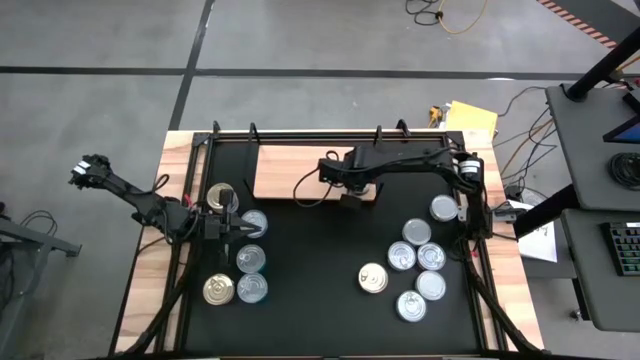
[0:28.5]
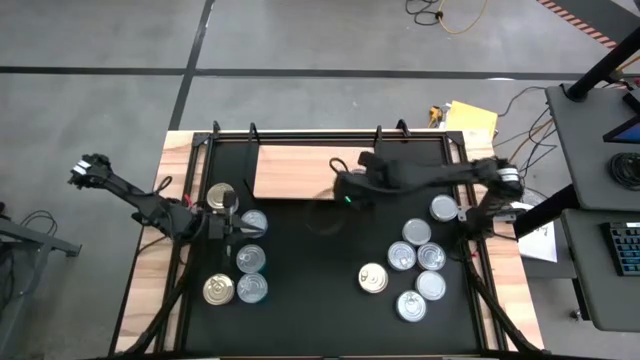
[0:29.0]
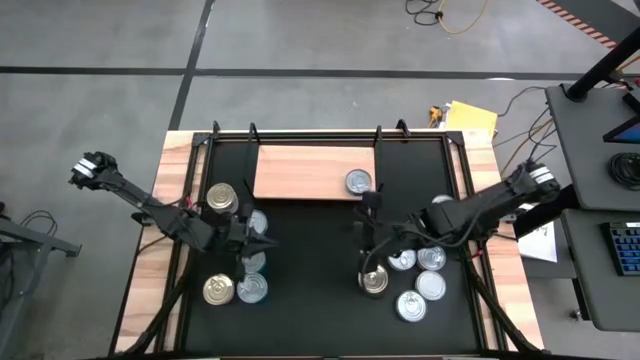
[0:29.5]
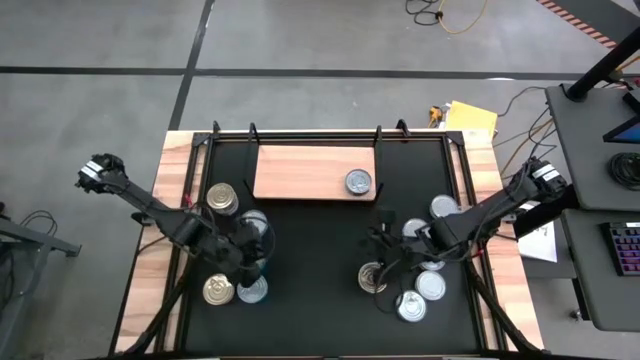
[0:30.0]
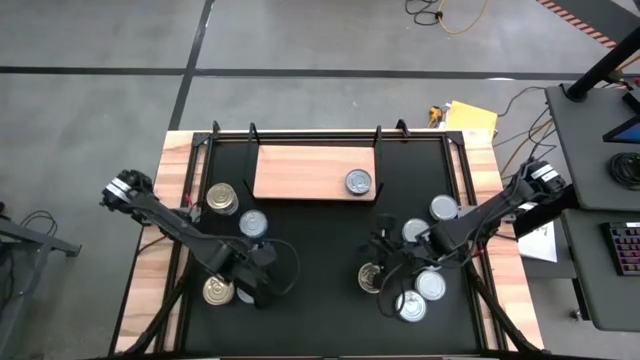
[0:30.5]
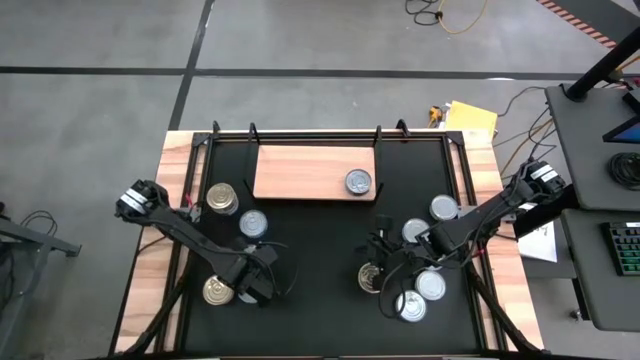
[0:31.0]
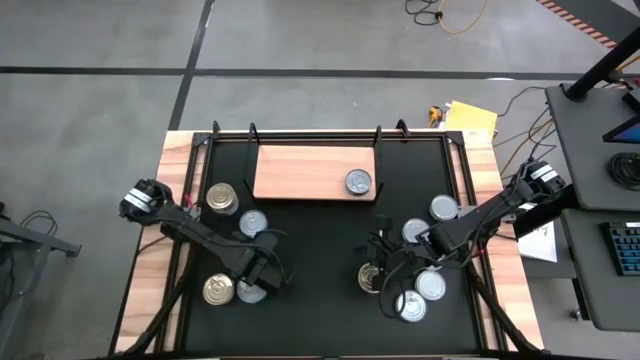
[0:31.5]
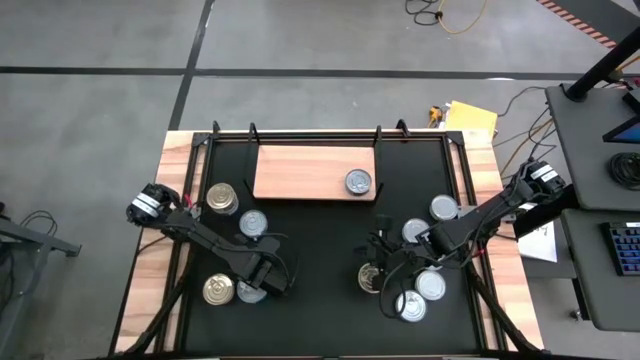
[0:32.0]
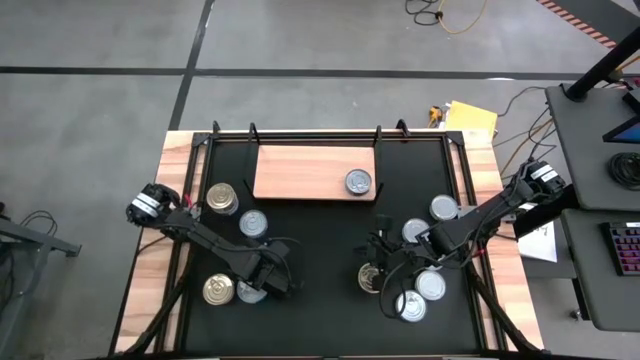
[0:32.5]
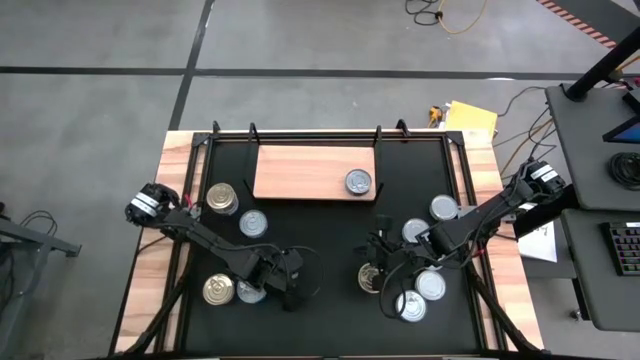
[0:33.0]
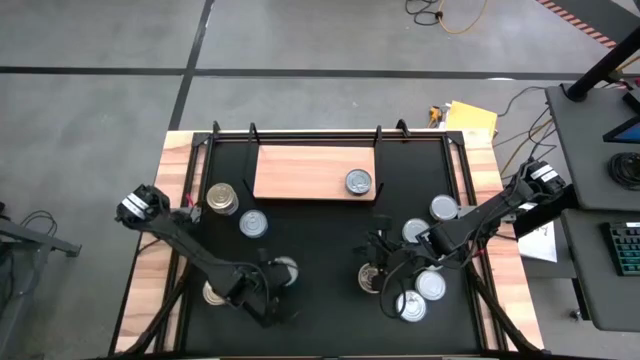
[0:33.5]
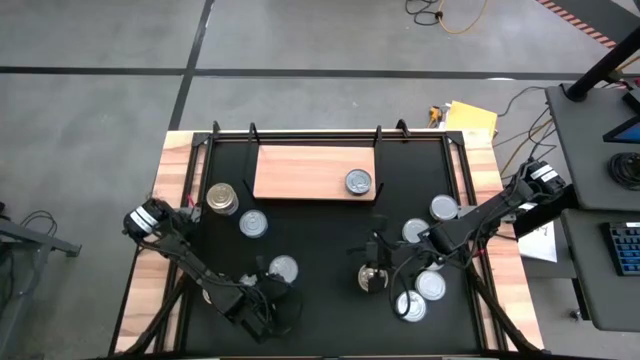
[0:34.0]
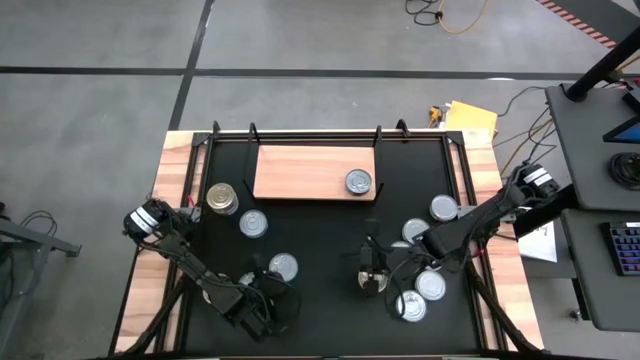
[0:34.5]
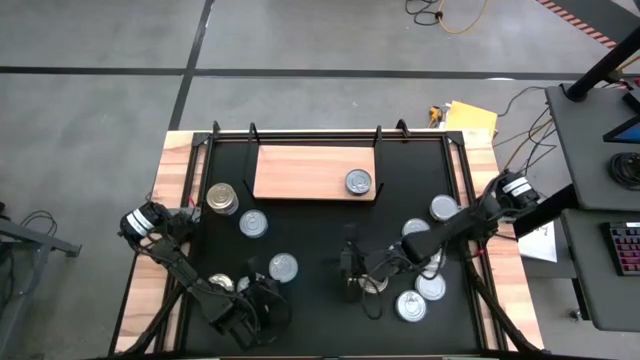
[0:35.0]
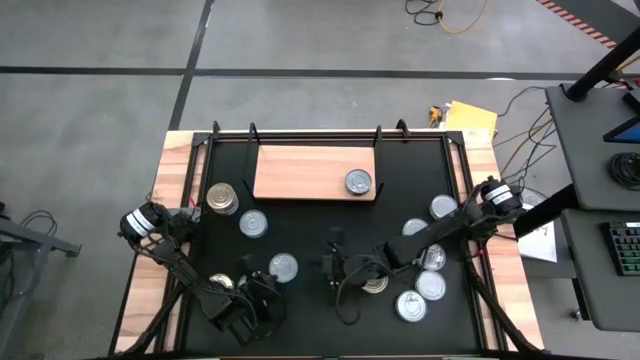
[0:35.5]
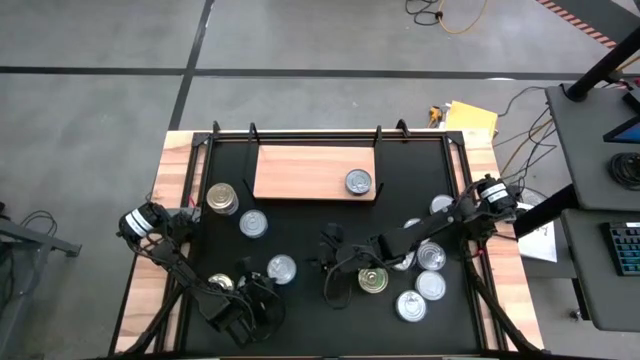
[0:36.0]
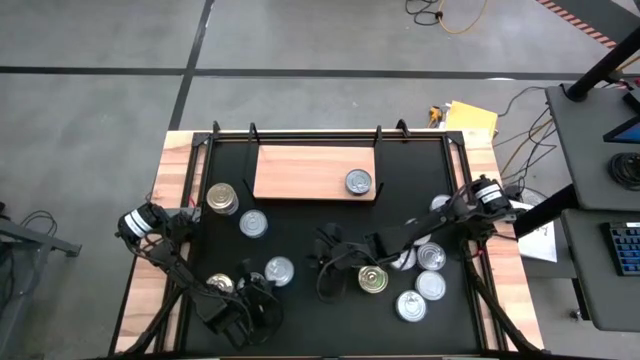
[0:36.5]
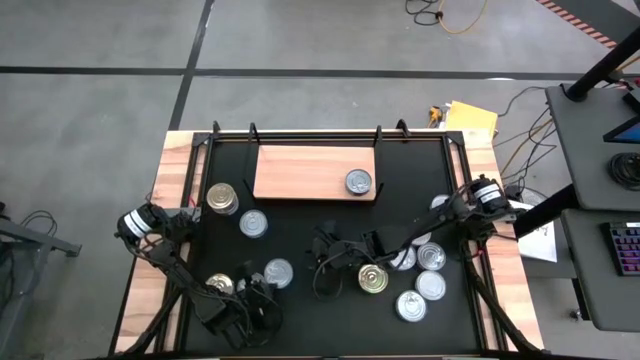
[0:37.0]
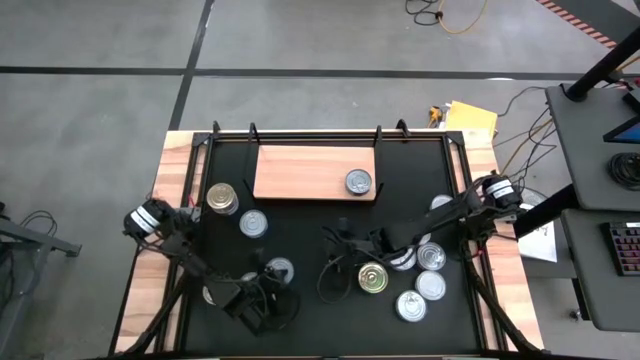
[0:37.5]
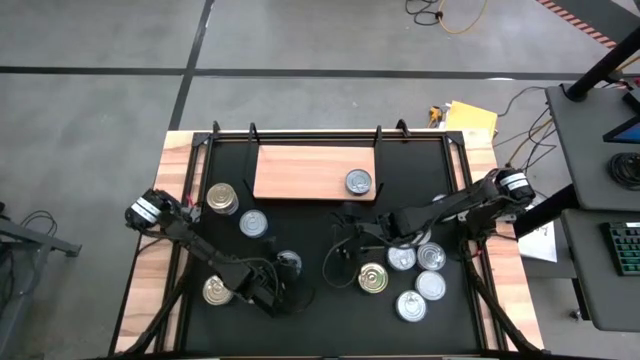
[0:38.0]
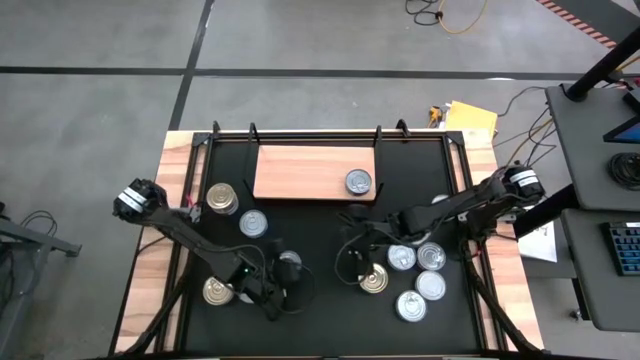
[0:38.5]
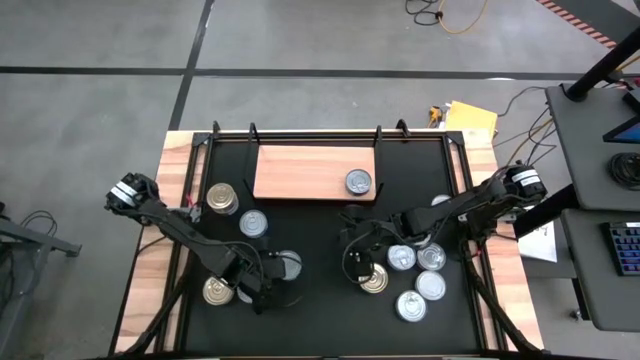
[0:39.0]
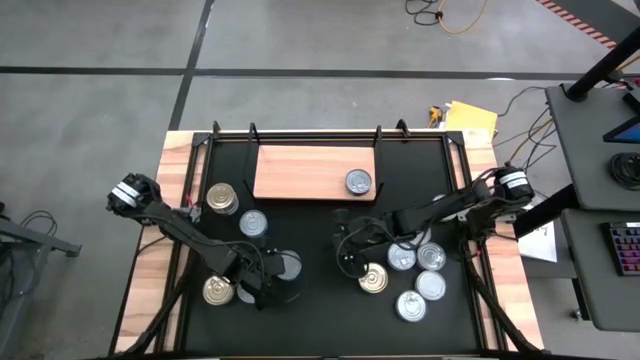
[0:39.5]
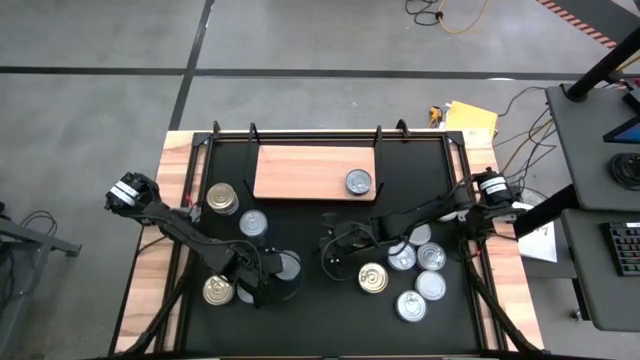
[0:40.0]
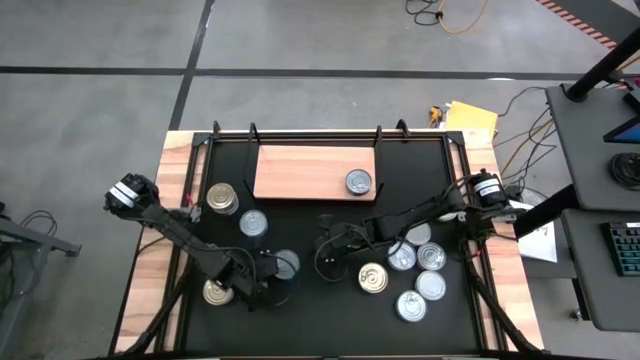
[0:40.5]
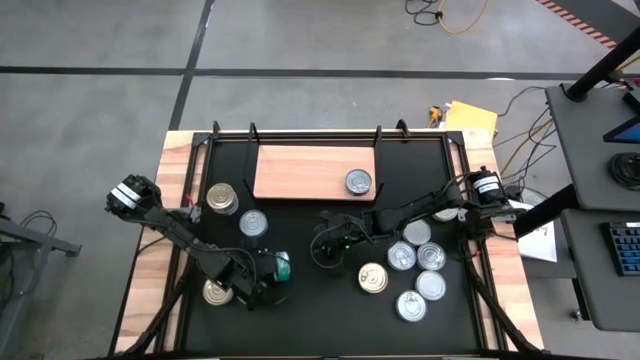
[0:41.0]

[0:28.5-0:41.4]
Task: Stack canned seafood by type on shelf
Put the green tuna can on the shelf

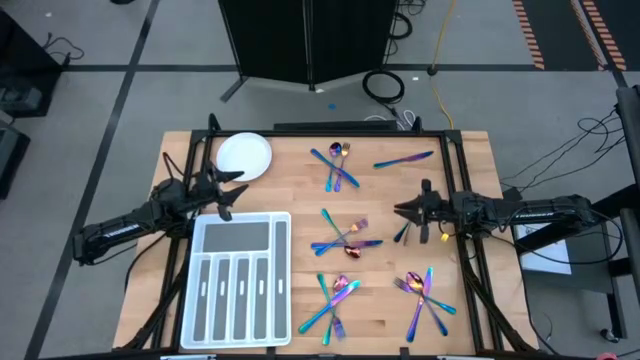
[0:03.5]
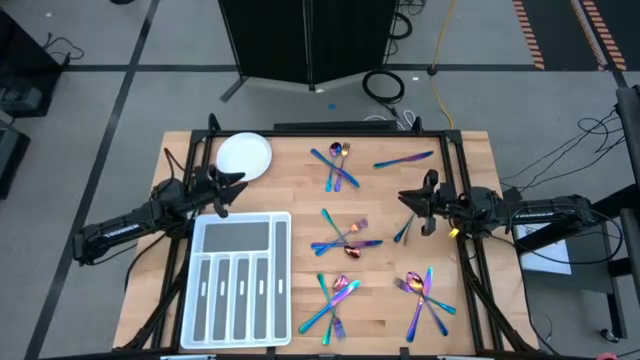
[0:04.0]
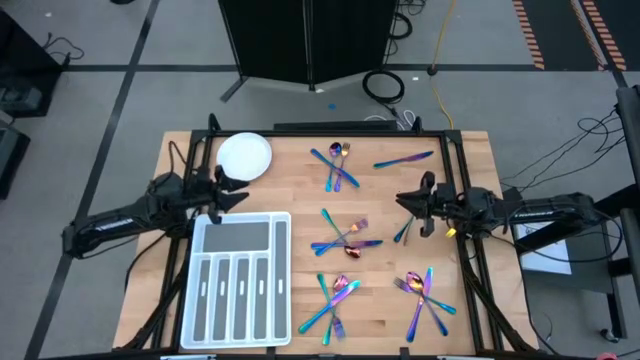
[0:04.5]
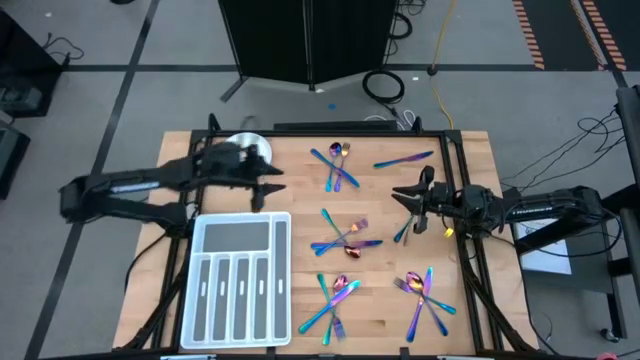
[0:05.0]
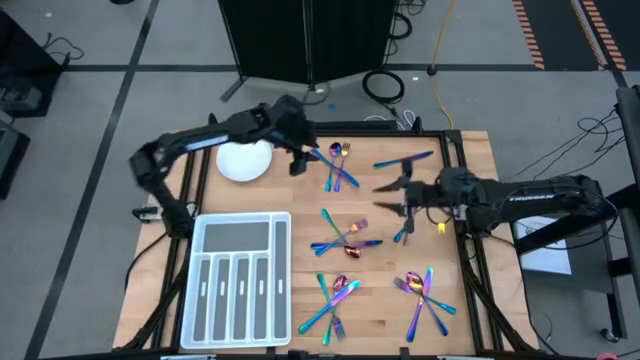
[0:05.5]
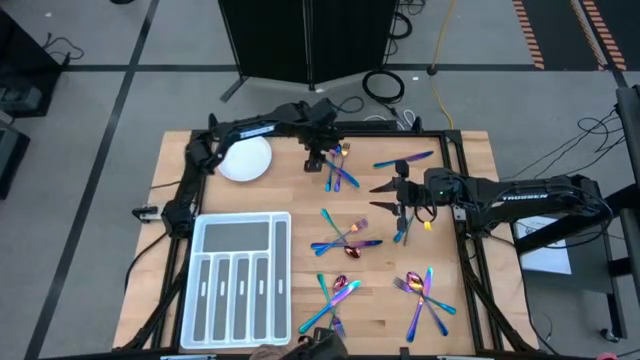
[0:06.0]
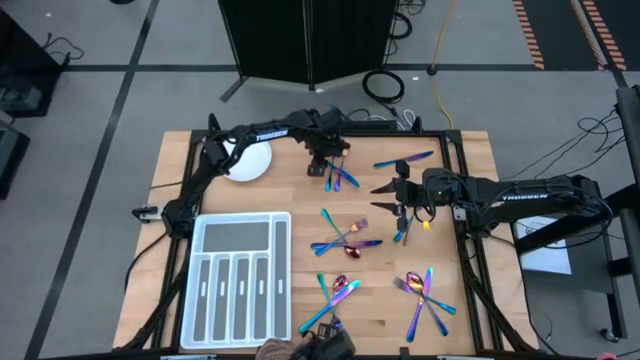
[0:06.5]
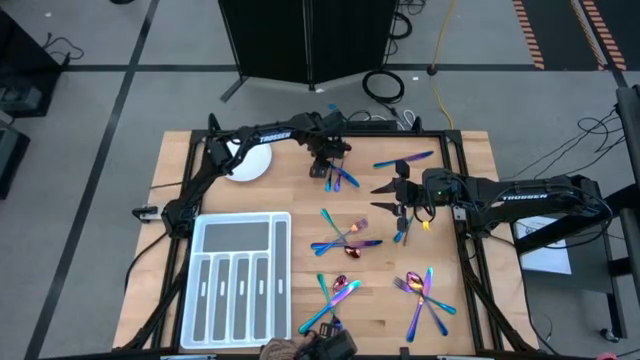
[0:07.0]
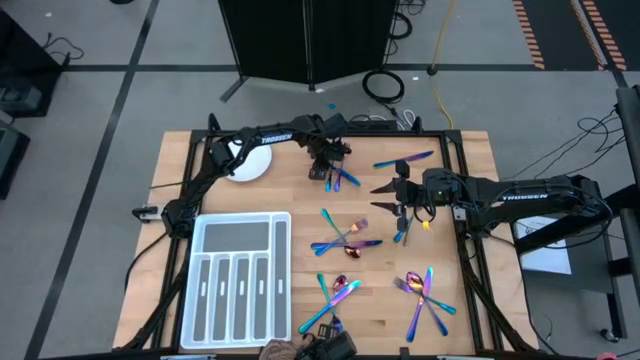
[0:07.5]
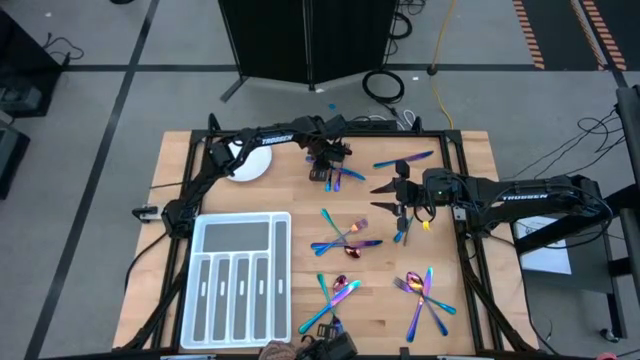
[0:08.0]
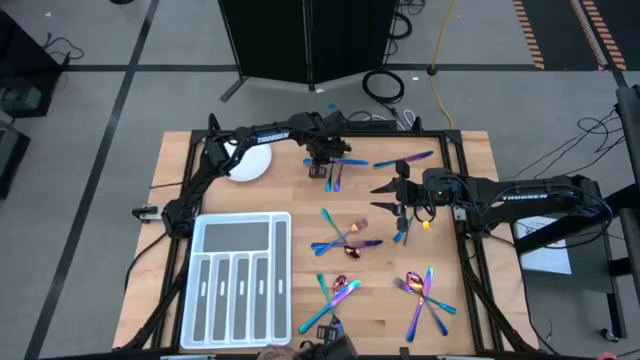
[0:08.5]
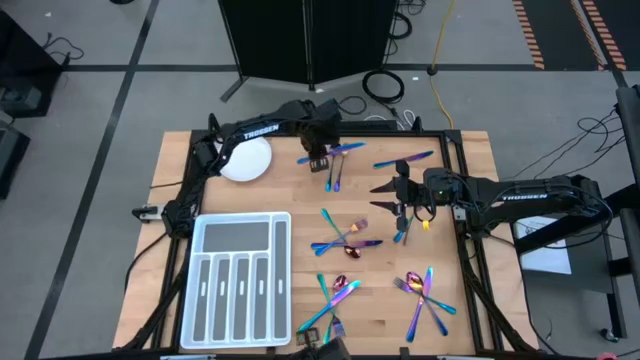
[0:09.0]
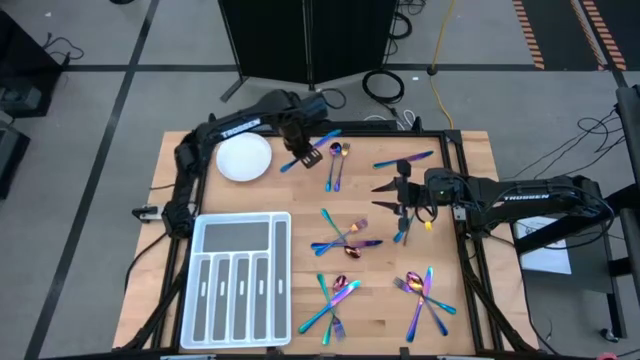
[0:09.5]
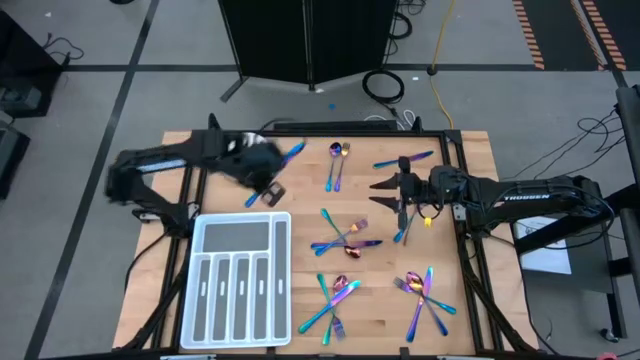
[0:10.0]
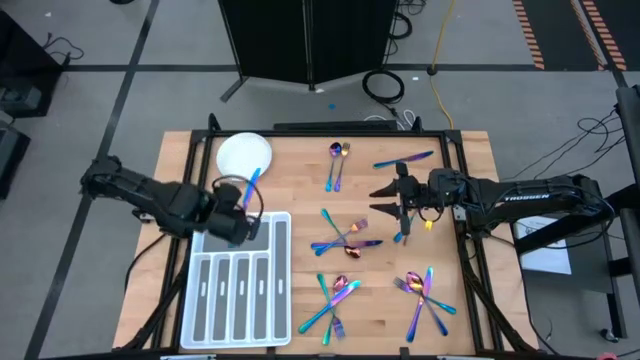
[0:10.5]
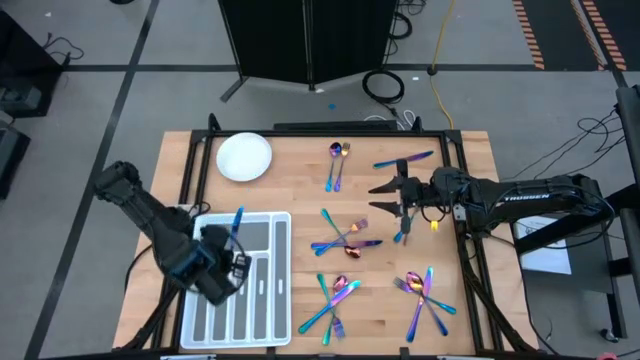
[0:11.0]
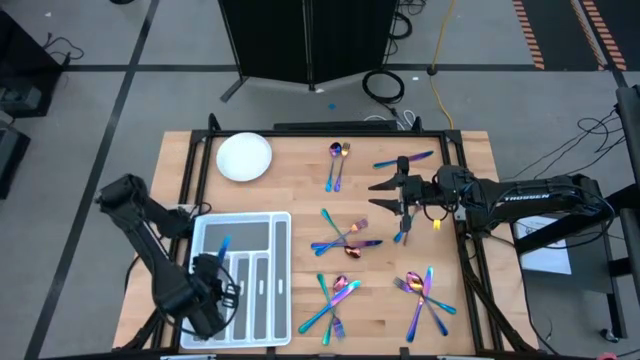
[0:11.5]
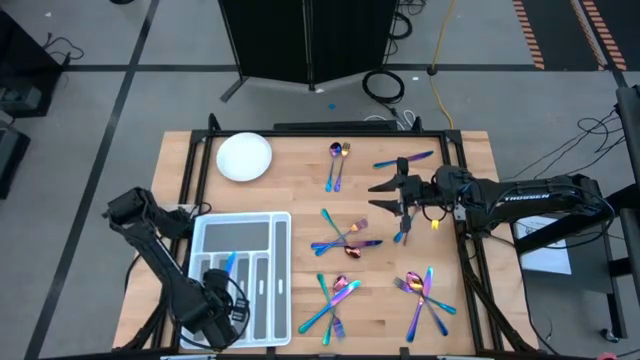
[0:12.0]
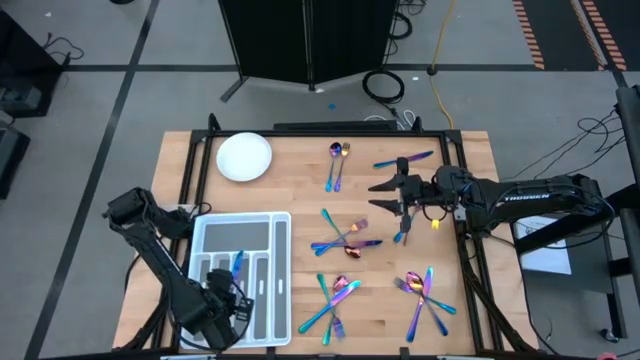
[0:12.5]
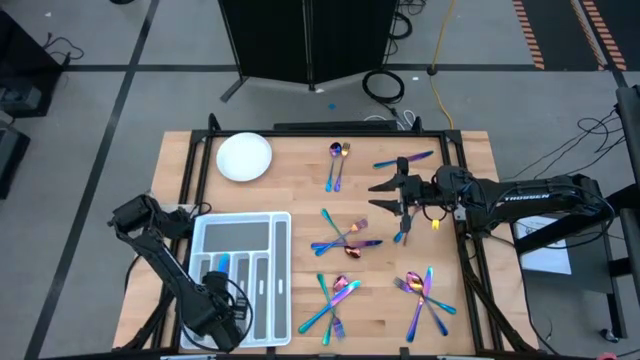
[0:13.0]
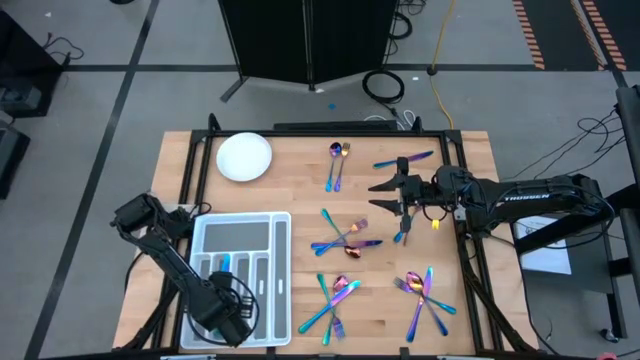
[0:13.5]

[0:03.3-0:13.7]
Task: Sort silverware
Put the iridescent blue knife in the middle left slot of the silverware tray
